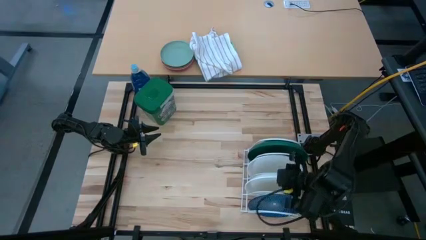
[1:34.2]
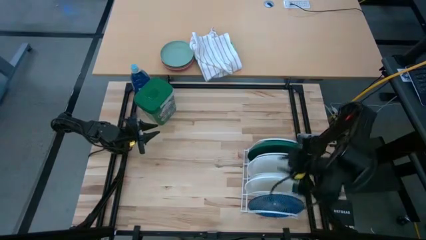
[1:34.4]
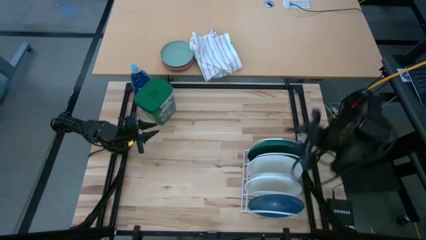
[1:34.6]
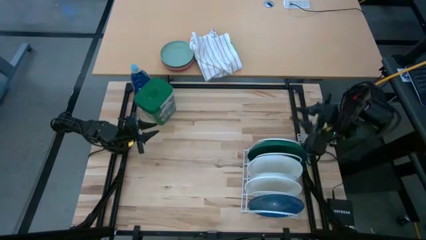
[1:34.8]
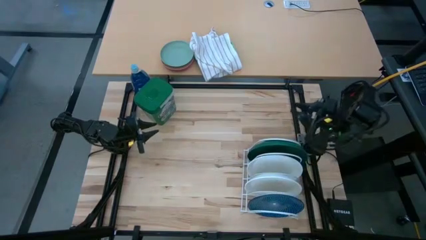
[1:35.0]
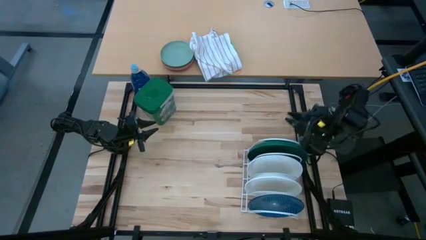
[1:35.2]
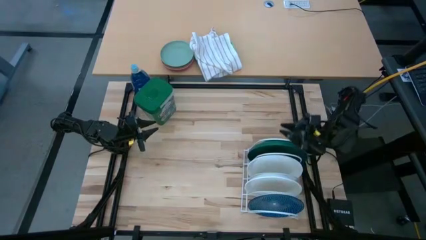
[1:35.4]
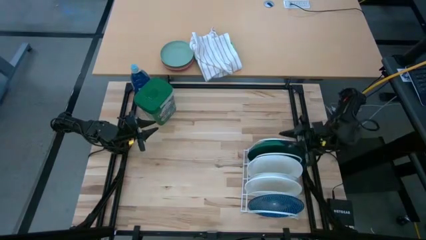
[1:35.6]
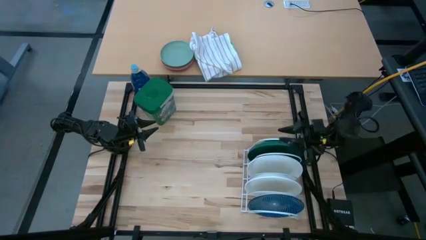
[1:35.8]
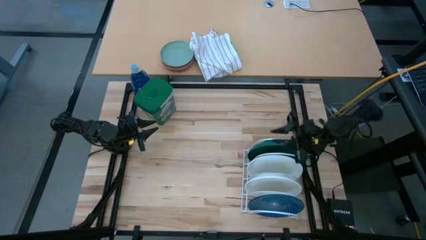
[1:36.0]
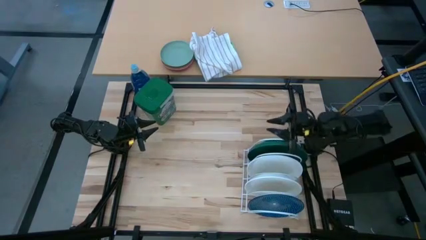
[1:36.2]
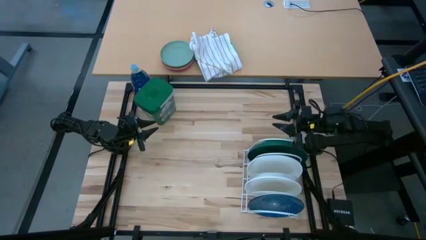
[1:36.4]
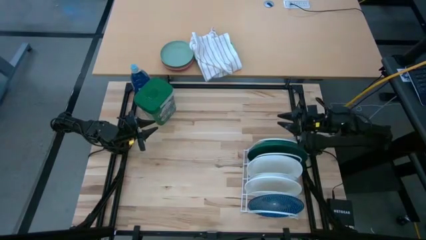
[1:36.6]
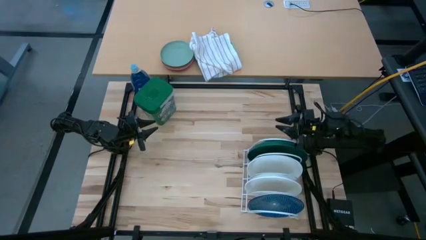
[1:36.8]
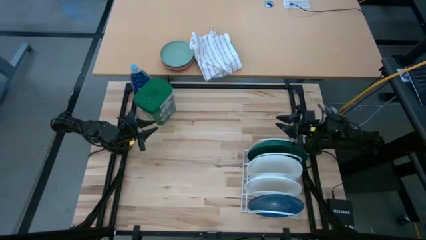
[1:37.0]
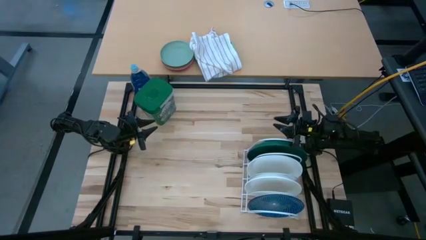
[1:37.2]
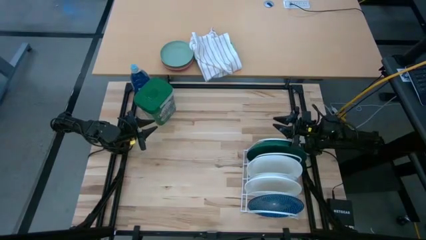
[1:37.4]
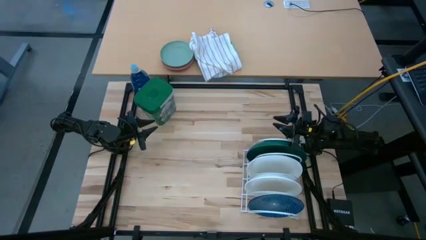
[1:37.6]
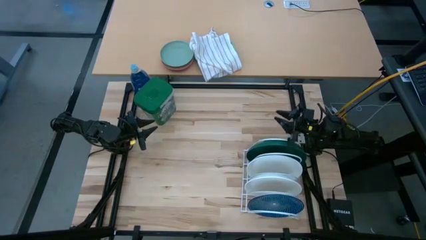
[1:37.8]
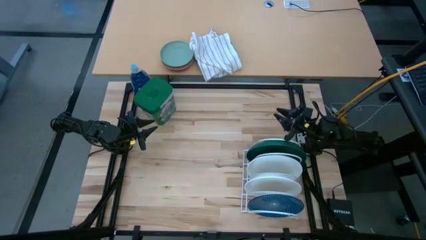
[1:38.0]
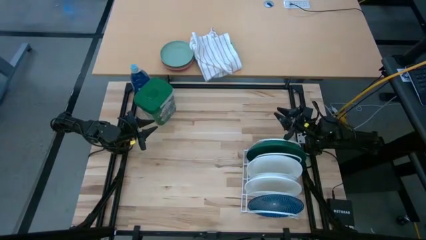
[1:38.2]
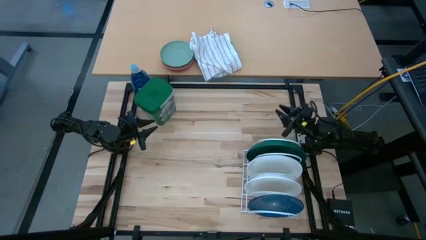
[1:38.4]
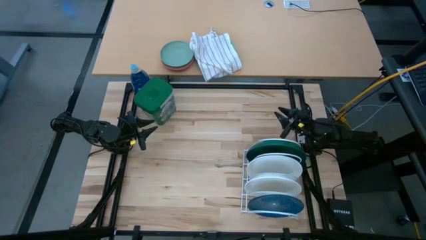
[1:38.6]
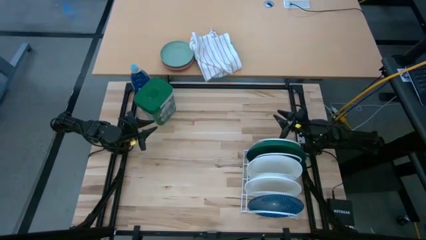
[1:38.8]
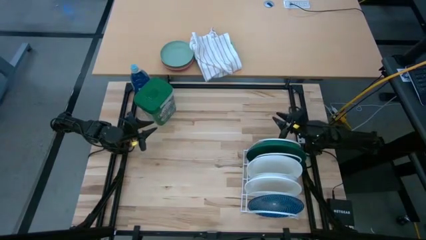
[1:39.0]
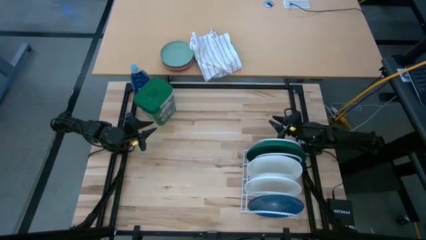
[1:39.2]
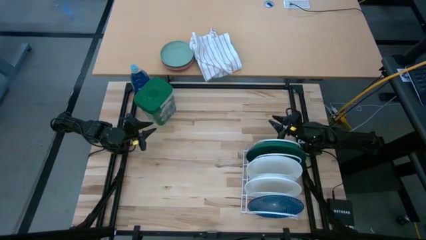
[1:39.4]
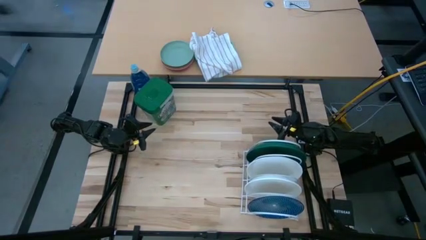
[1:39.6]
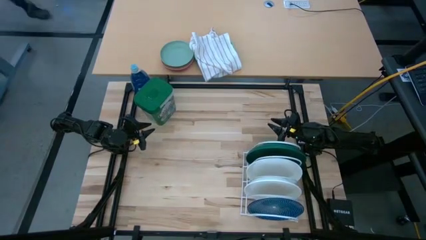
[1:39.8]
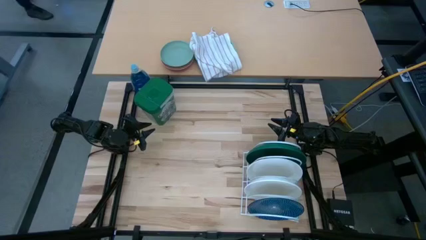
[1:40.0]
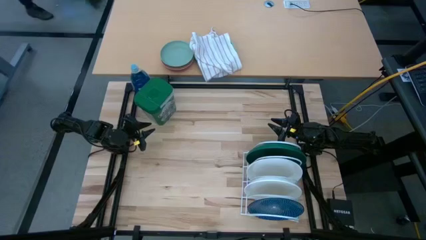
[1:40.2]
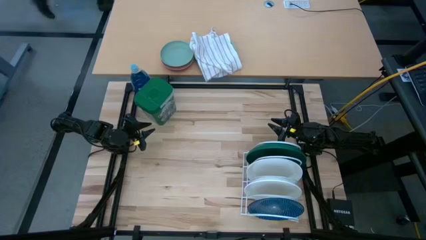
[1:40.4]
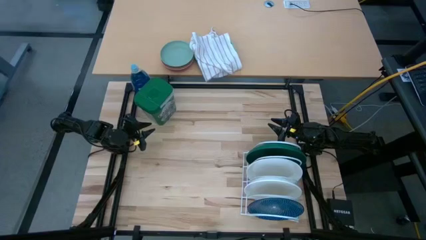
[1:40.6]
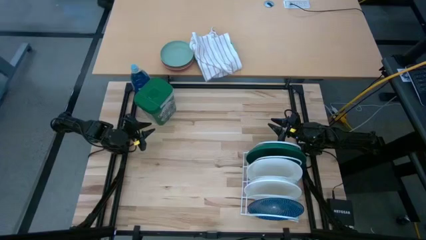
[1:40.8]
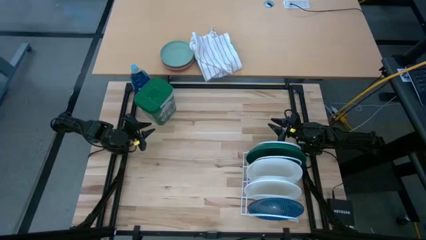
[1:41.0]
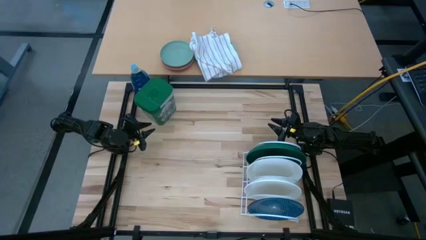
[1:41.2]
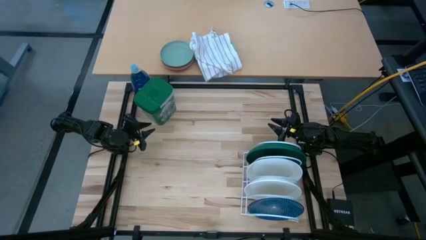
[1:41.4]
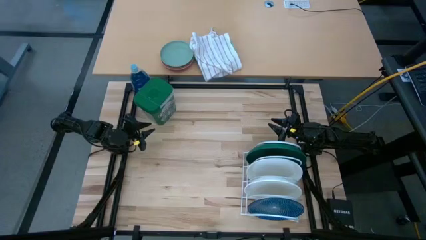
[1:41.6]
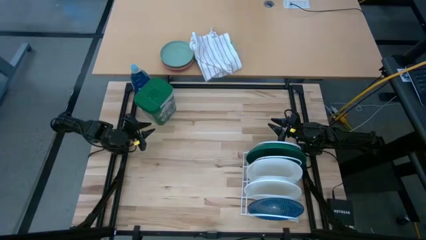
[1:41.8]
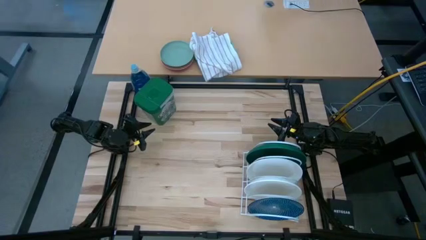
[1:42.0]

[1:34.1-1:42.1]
Task: Sort dishes
Return to Home Position

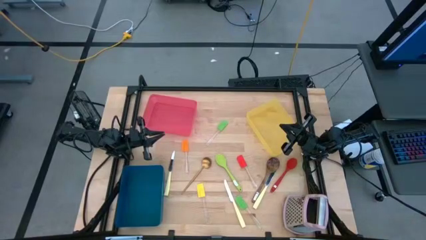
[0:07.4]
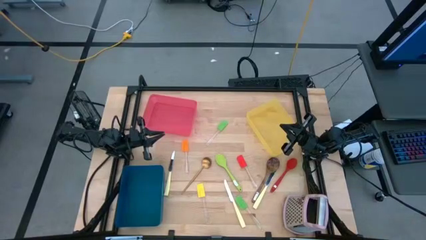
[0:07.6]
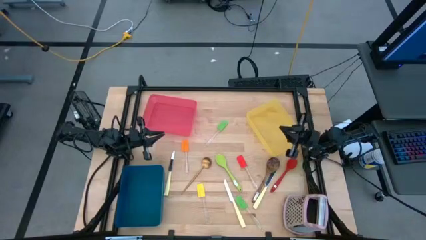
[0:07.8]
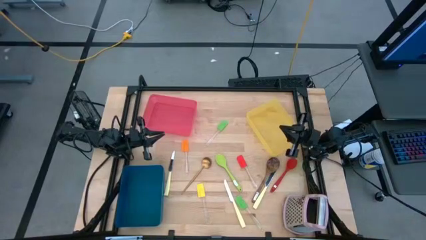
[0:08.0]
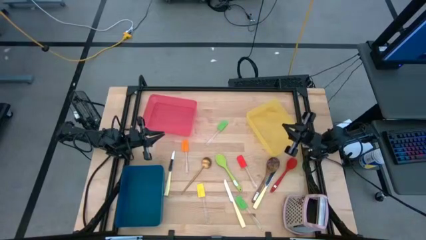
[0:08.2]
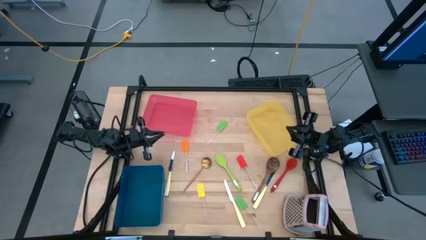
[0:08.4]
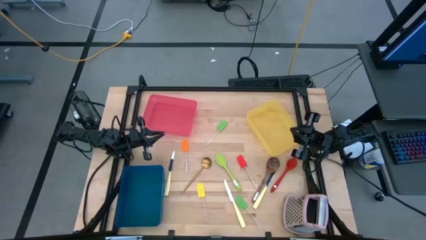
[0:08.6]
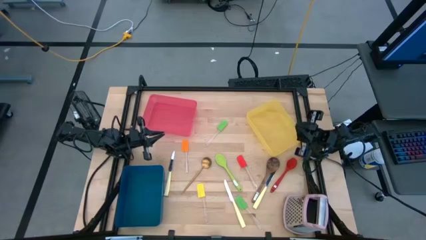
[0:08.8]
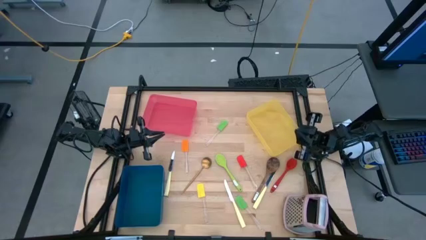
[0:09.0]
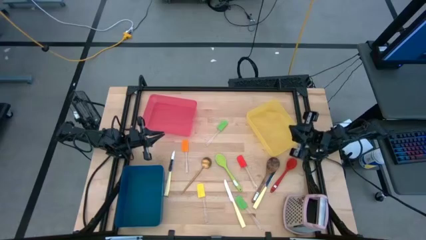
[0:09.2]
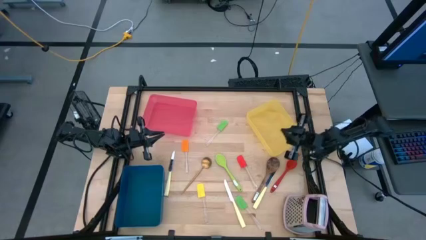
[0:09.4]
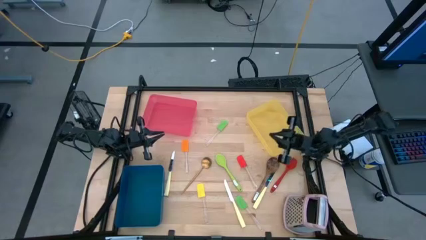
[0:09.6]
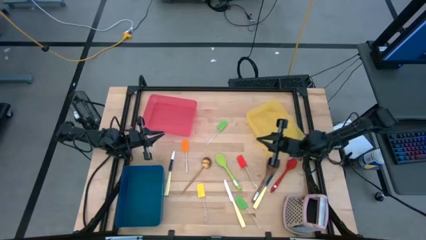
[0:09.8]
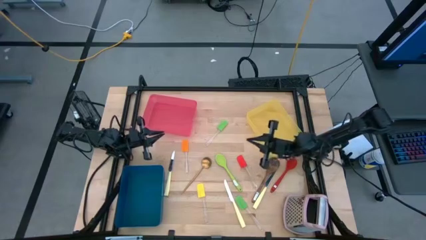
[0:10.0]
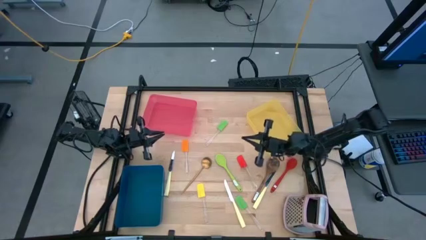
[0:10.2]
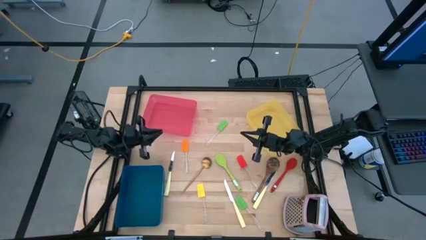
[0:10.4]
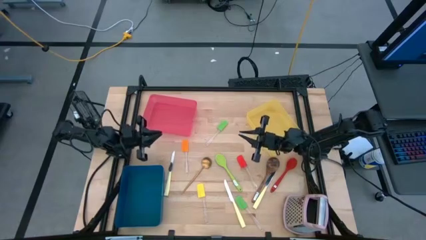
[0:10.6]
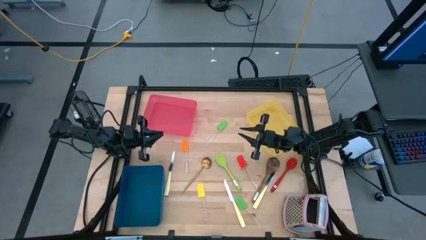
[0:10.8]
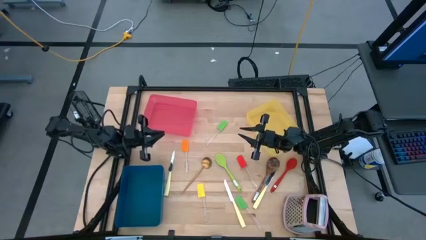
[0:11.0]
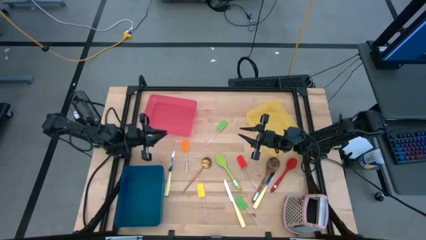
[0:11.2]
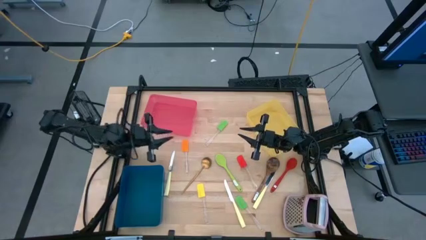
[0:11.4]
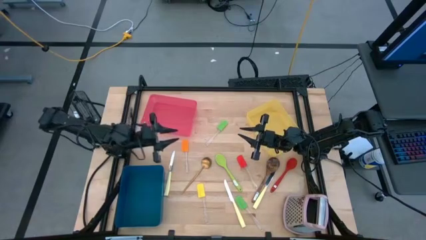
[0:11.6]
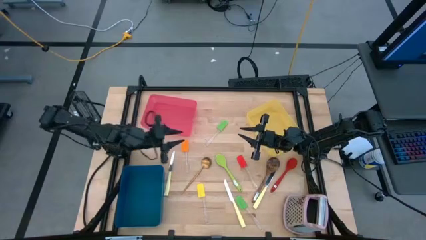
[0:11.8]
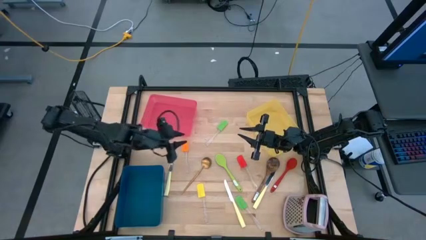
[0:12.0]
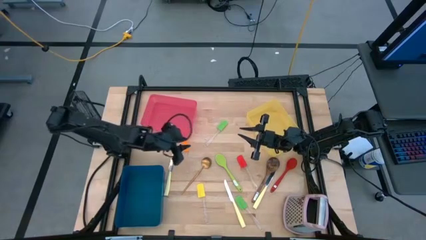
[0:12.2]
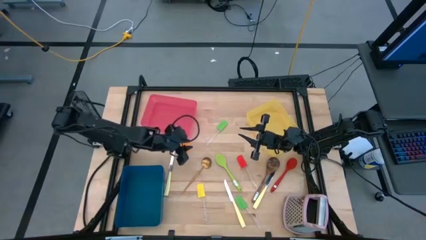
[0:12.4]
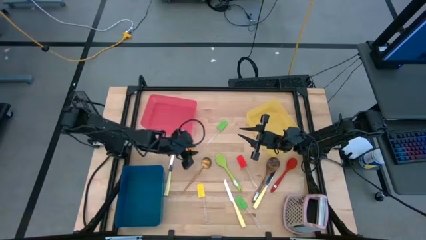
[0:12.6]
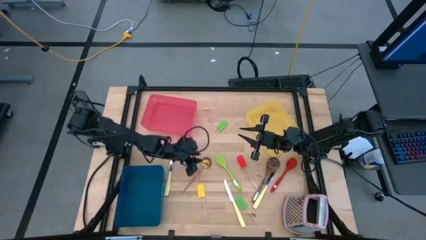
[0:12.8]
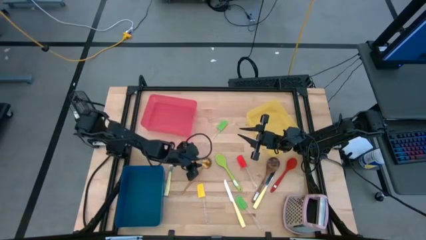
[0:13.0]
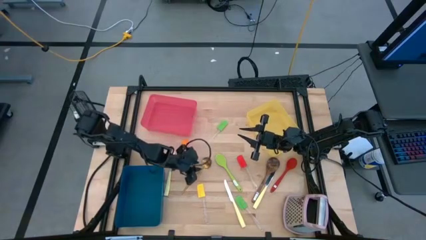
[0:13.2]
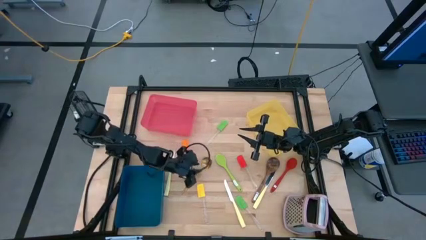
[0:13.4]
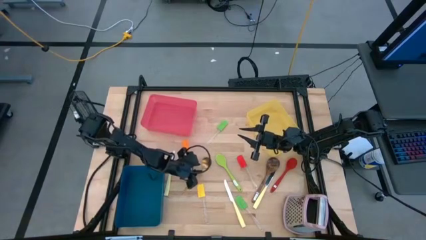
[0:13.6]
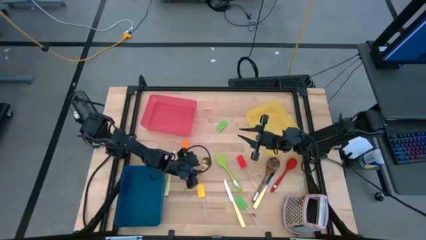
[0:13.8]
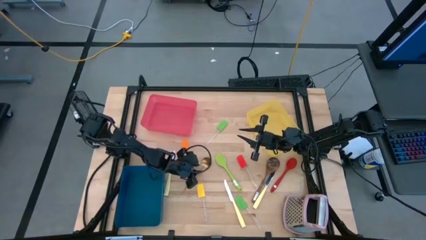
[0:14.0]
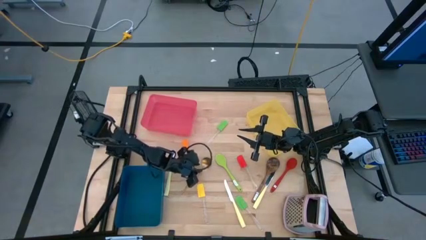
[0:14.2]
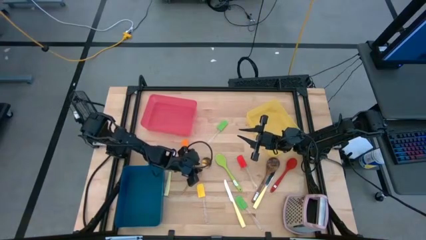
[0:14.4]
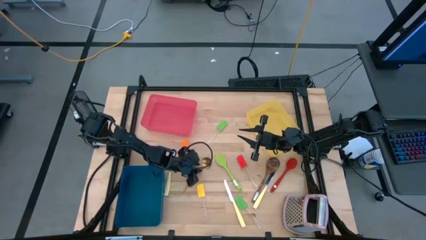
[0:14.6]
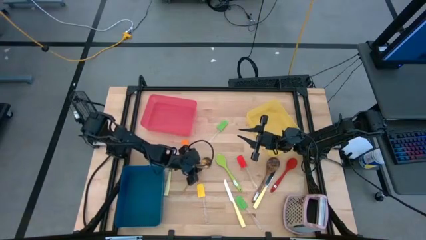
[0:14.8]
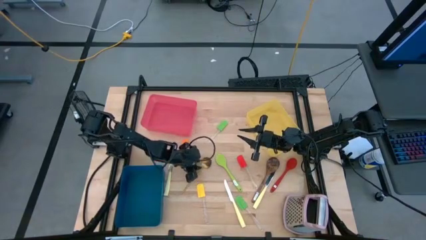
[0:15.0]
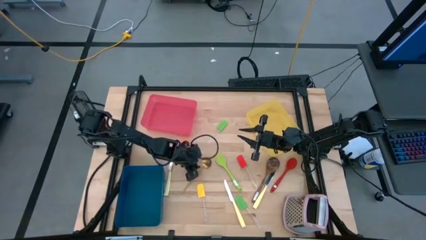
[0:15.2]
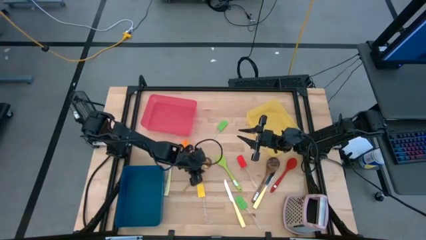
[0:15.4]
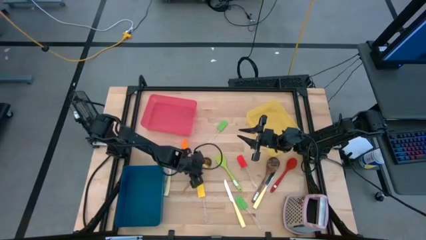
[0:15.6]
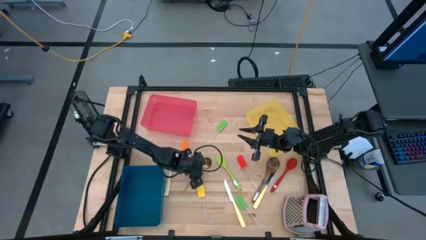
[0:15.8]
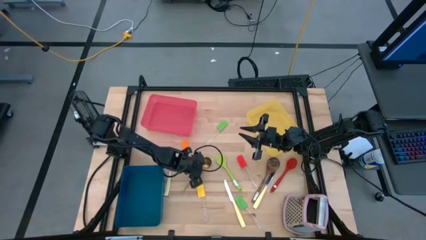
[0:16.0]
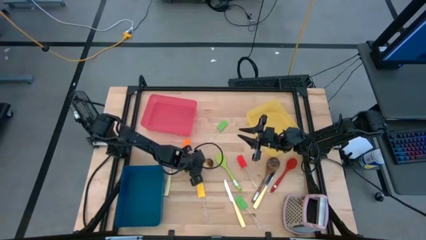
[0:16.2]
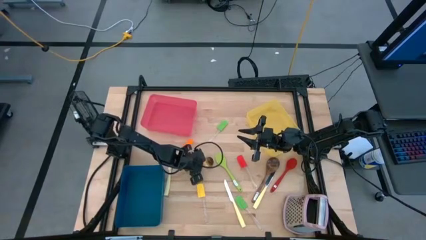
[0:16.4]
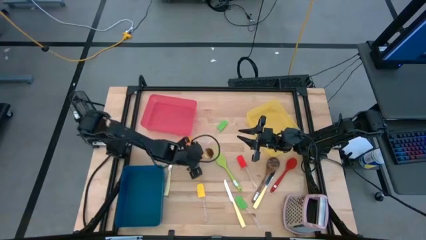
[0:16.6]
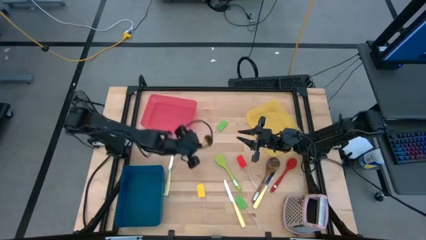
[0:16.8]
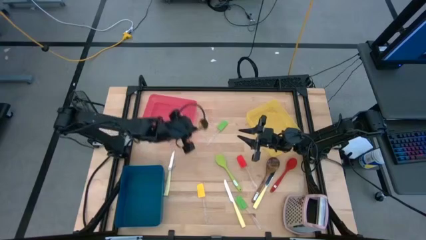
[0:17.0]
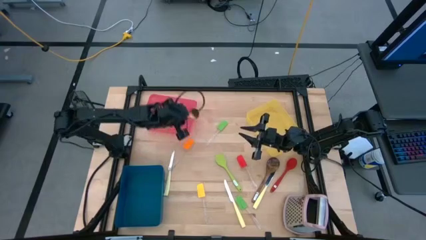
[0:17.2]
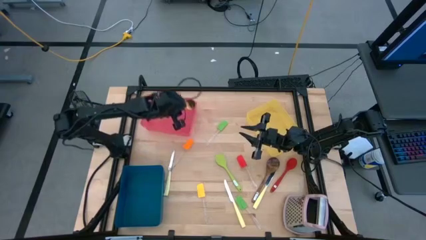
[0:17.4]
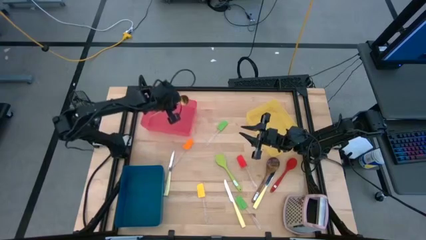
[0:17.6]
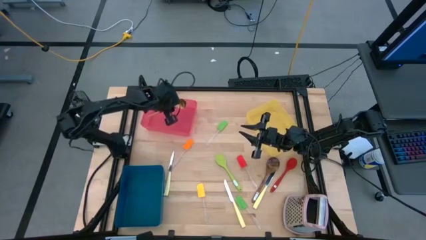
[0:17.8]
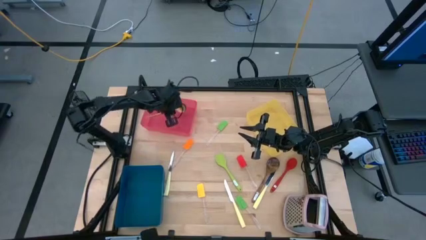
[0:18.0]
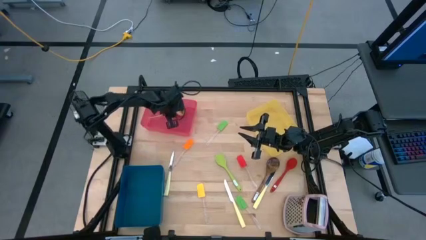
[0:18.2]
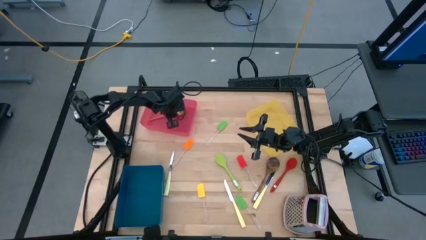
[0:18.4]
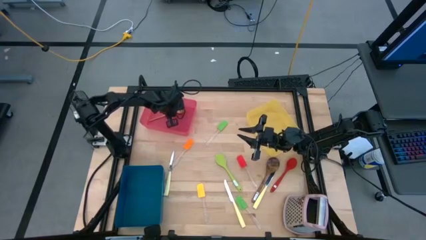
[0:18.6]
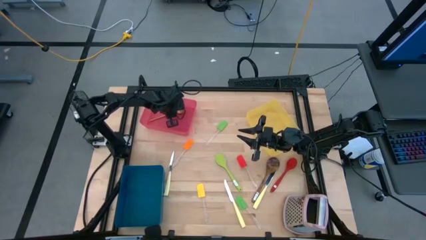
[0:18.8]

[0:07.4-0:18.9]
Task: Pick & Place Kitchen Items
Put the gold serving spoon into the red bin
